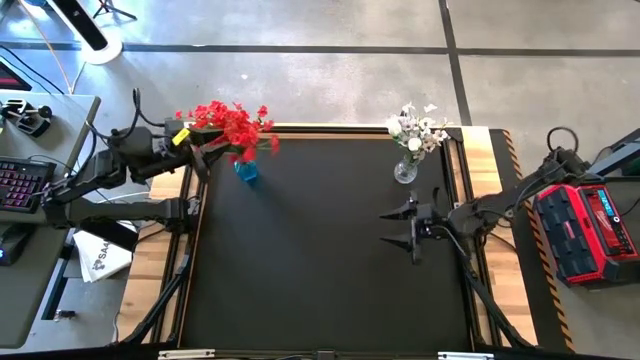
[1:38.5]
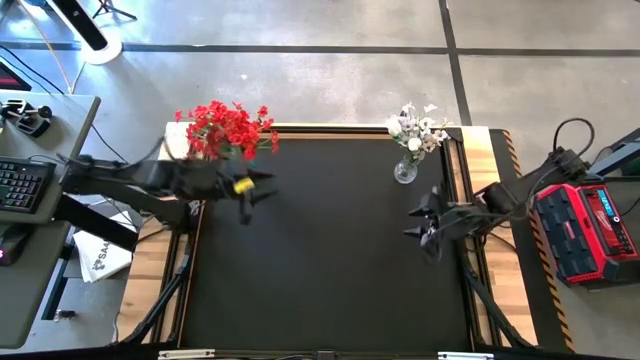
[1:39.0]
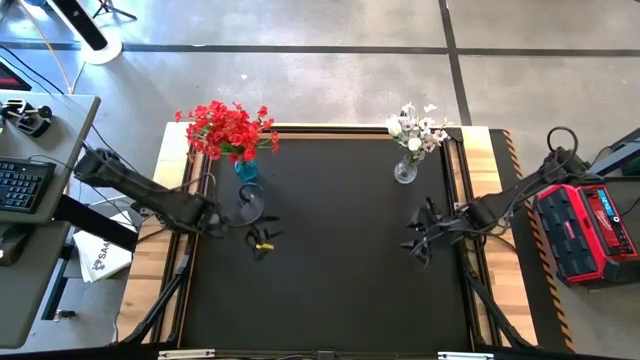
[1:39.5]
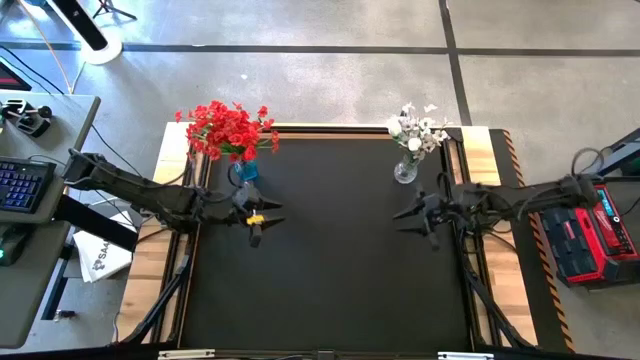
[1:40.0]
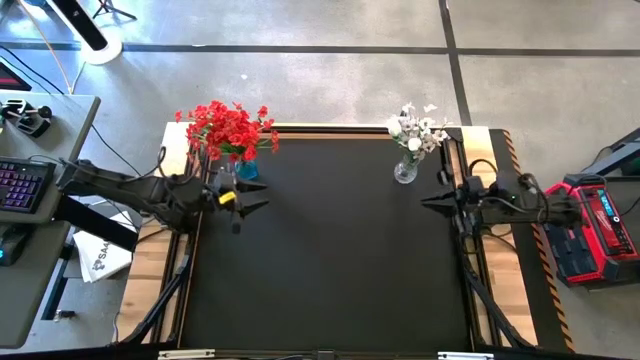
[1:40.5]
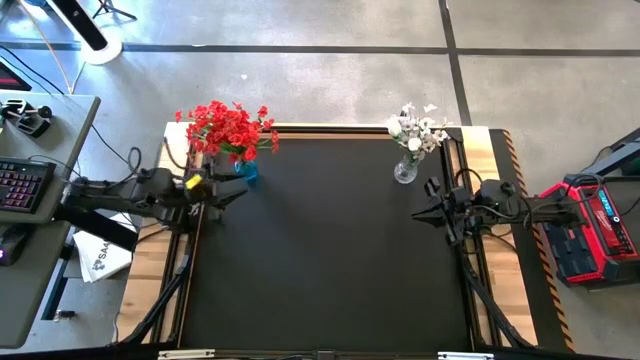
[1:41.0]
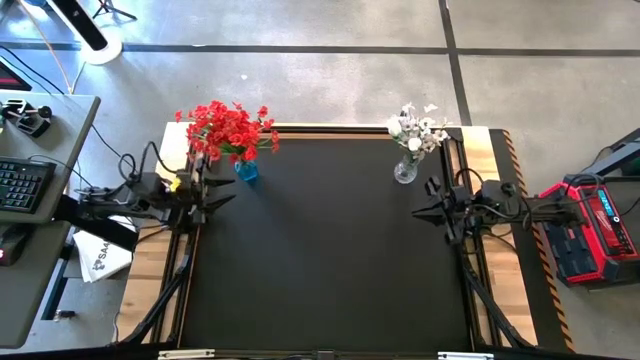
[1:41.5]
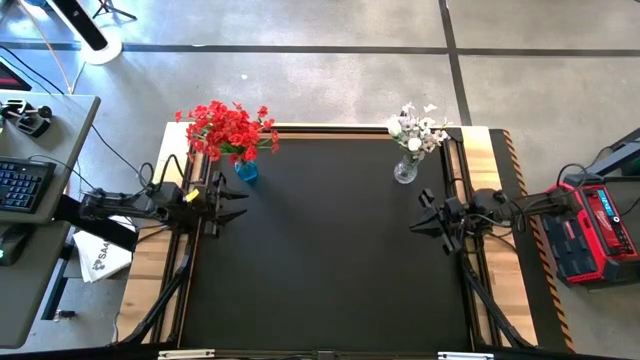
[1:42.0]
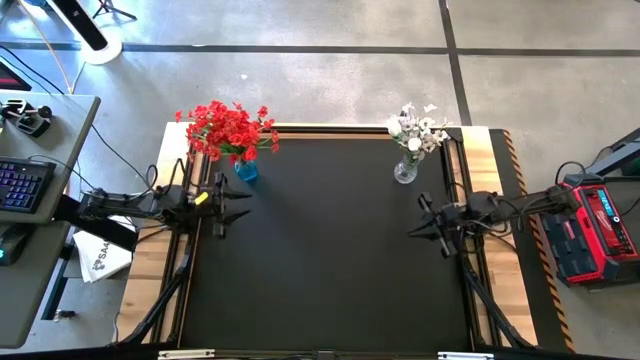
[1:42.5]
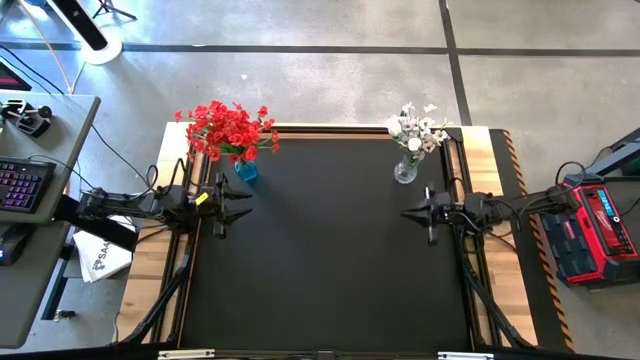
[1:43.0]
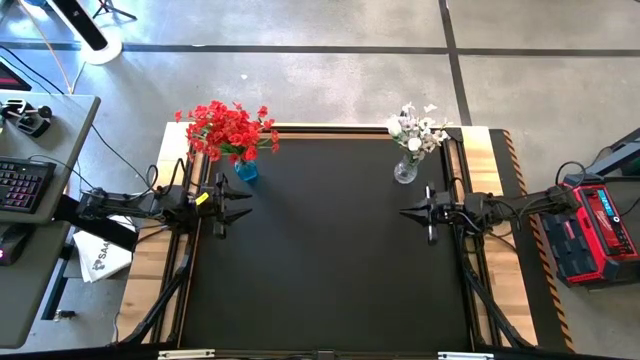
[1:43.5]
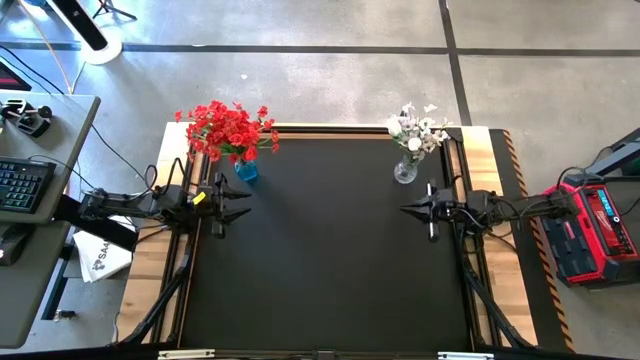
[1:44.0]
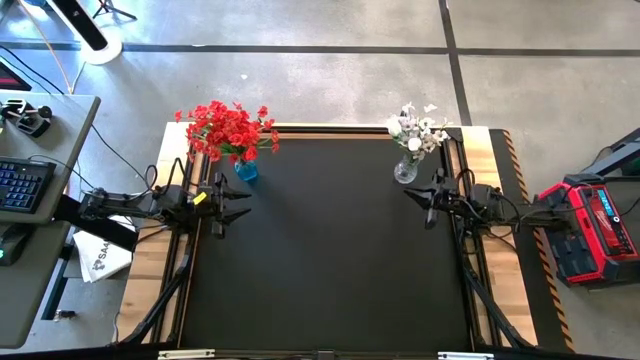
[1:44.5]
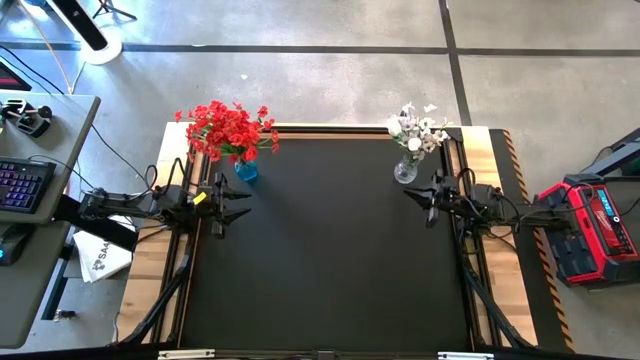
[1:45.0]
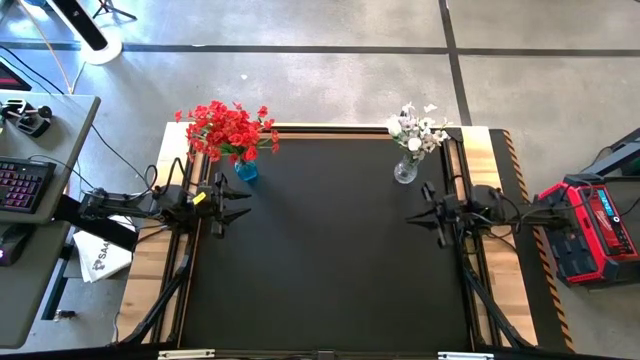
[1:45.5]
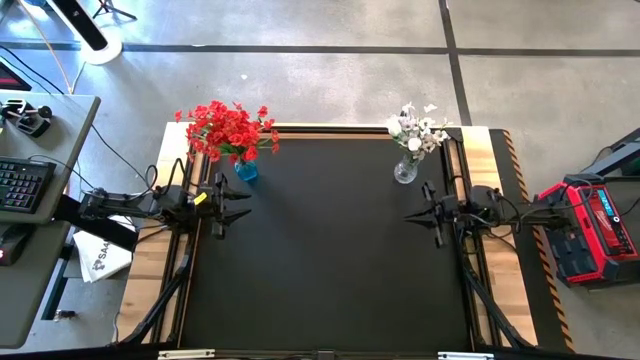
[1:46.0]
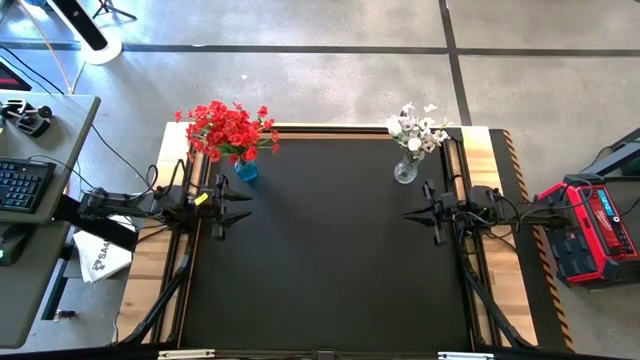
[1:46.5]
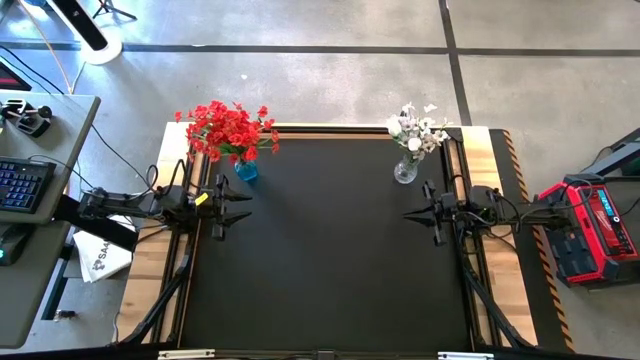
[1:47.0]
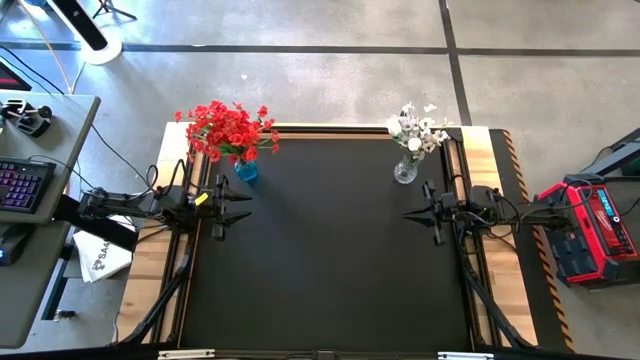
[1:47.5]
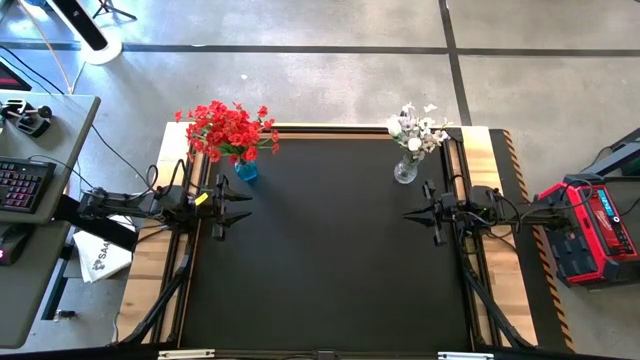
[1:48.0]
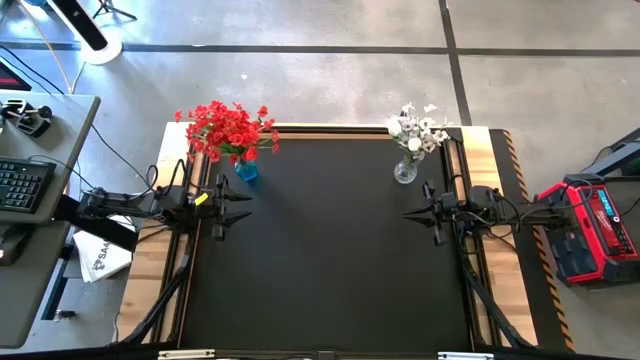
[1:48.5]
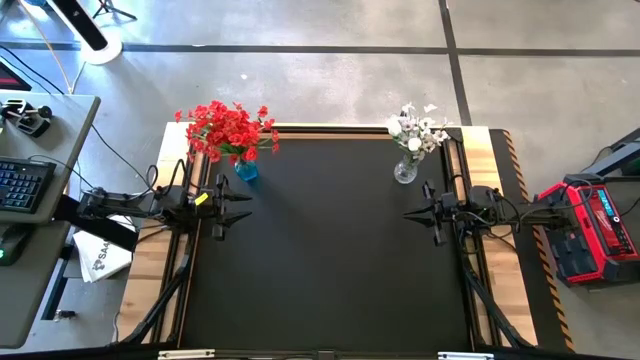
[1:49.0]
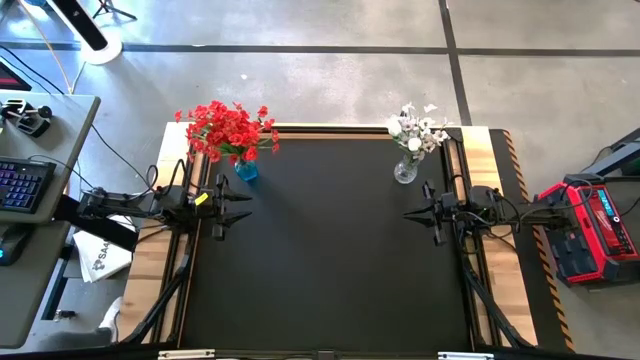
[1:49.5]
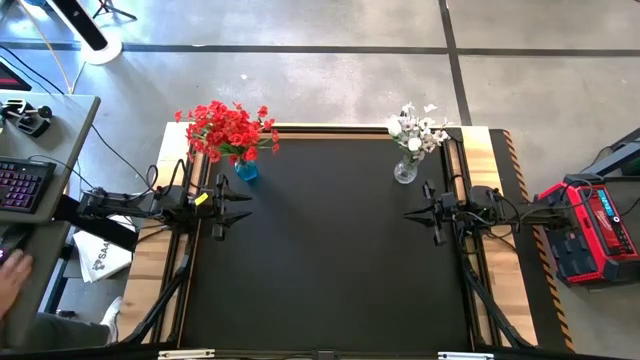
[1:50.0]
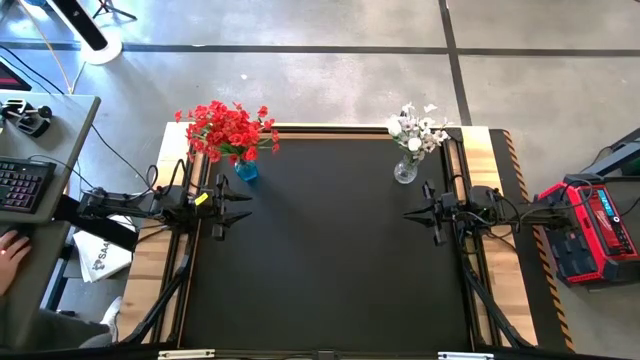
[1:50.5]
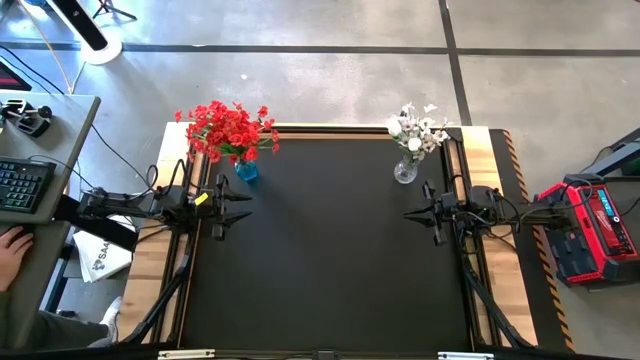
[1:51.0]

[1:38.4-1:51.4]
Task: Sort flowers into vase by color
Return to Home Position

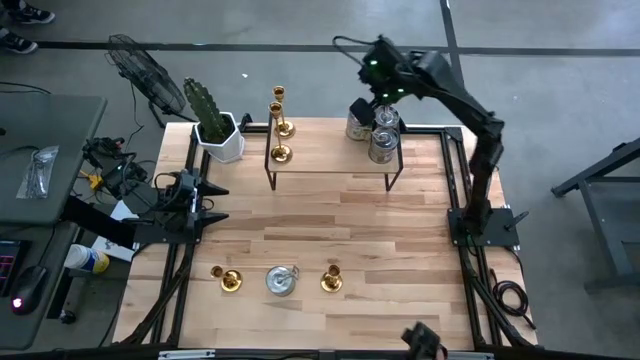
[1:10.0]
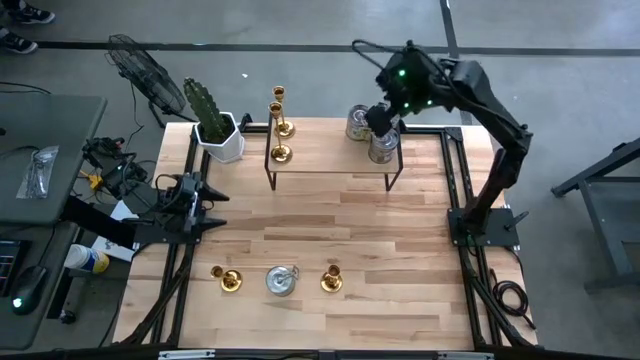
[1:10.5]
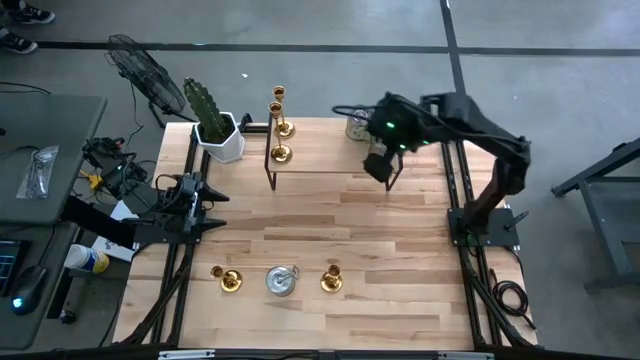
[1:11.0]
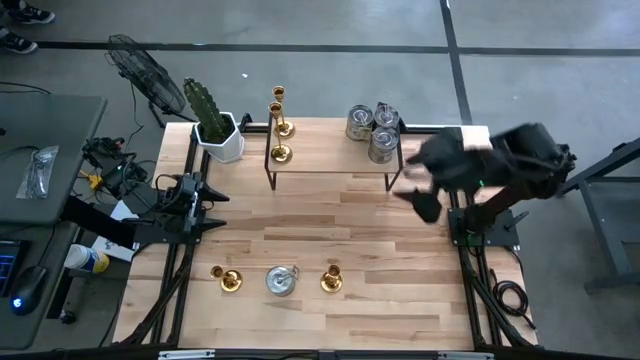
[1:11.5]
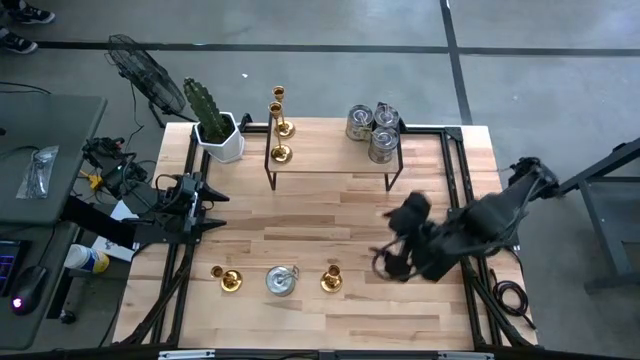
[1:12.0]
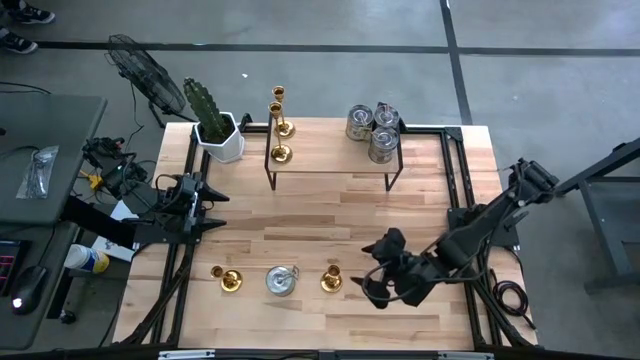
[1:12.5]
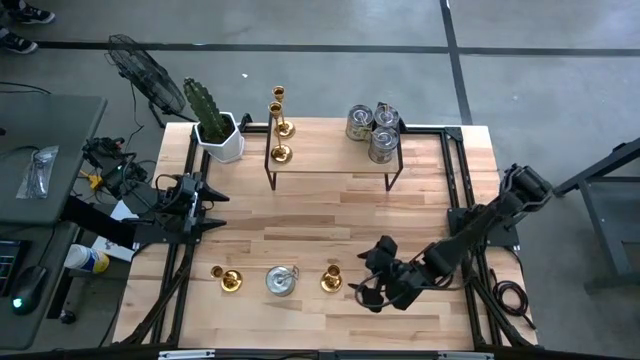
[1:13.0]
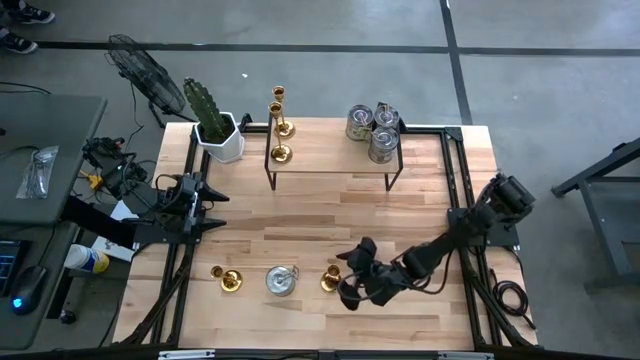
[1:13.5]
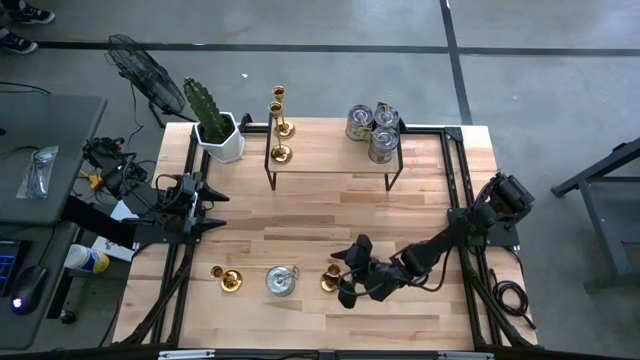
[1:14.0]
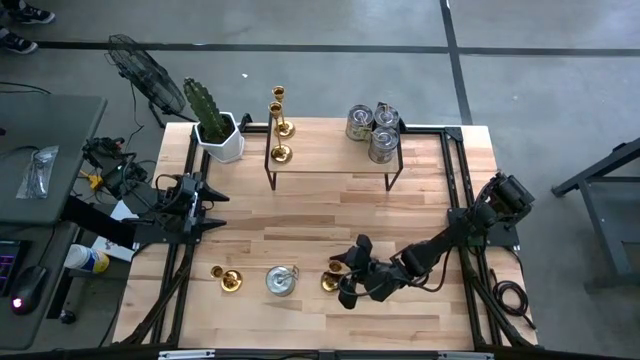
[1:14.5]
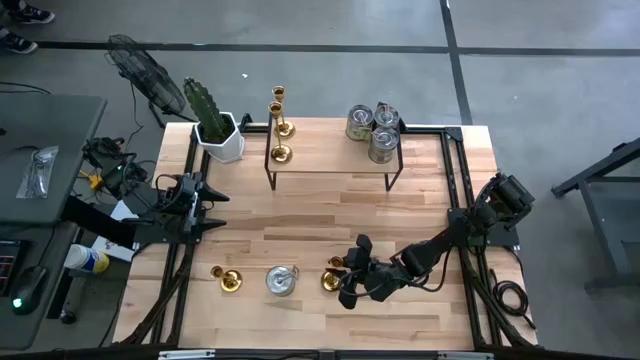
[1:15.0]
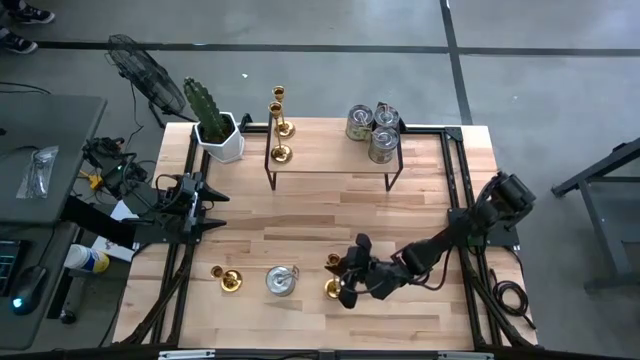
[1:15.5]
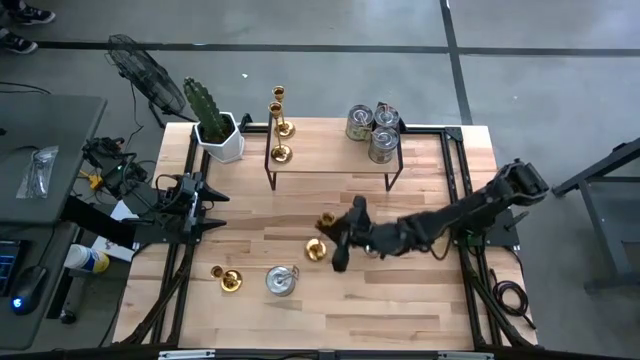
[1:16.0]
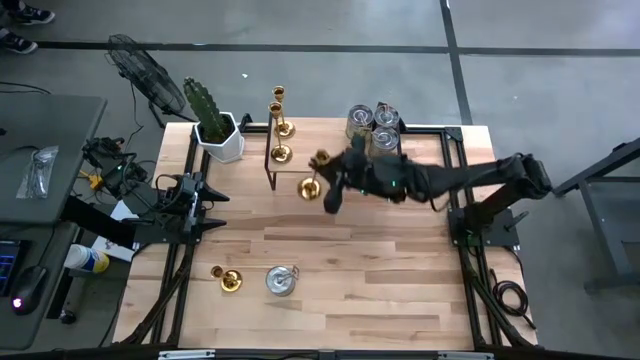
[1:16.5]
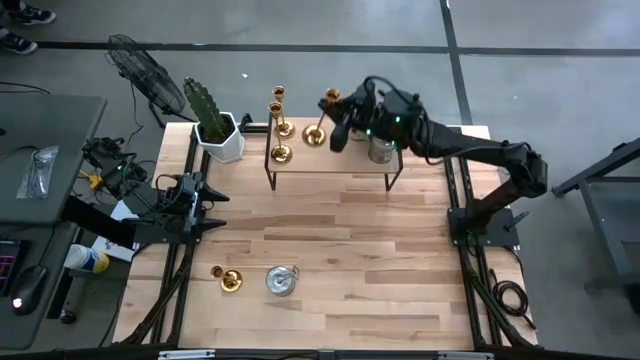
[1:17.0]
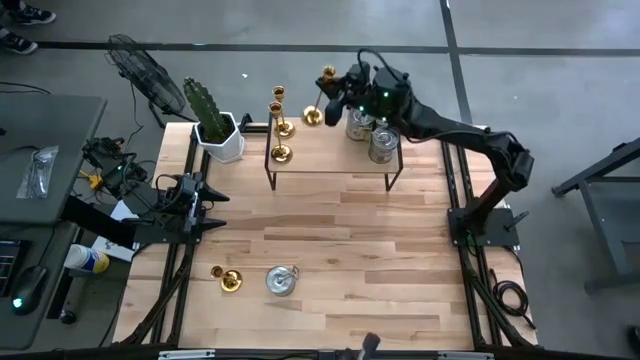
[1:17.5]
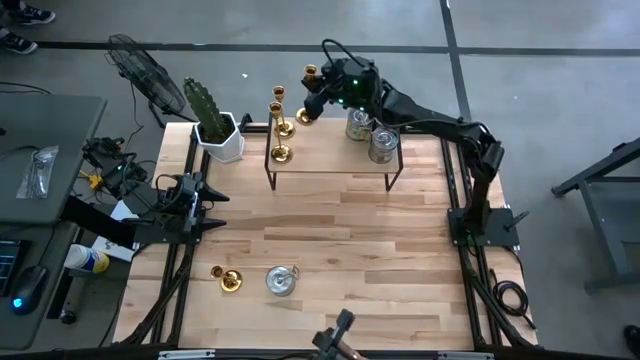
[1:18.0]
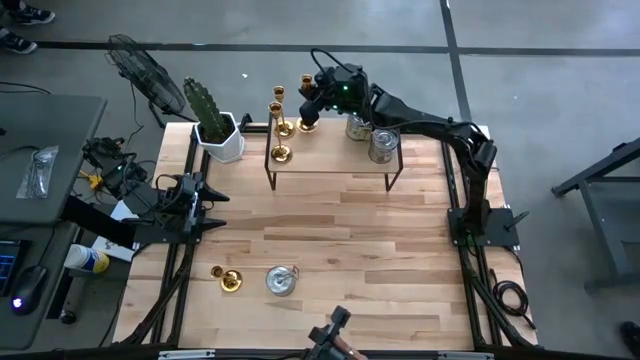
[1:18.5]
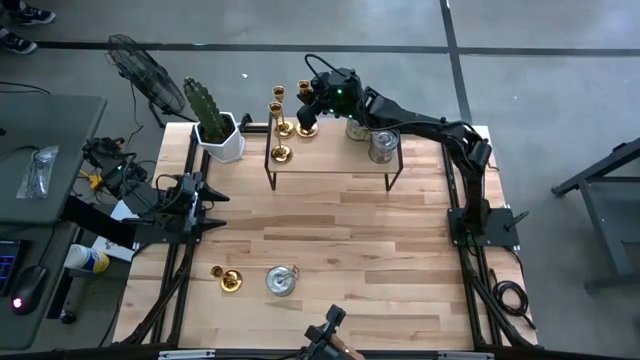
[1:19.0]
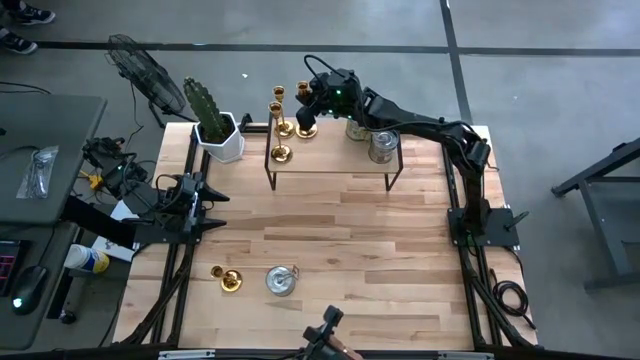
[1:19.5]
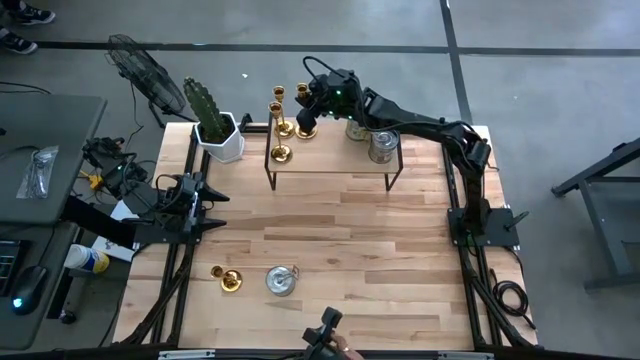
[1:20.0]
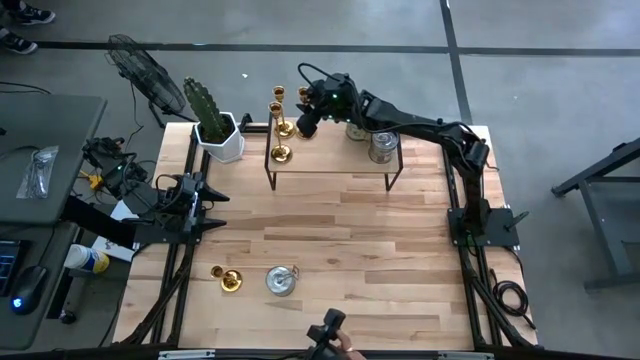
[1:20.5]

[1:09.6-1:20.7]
Task: Pick & Place candle stick holders
Put the gold candle holder on the shelf
